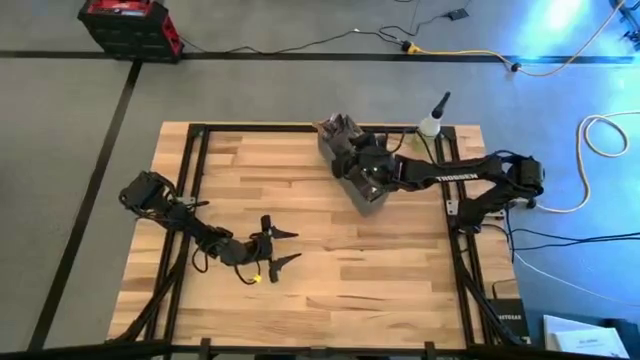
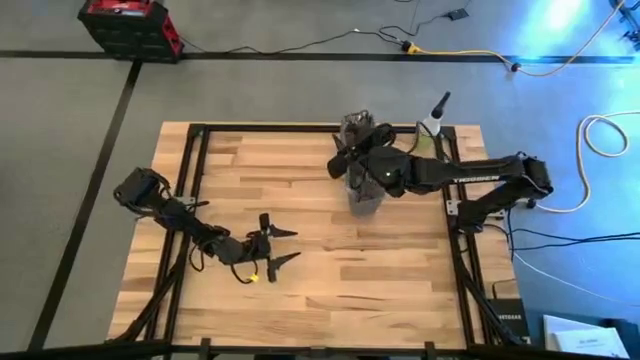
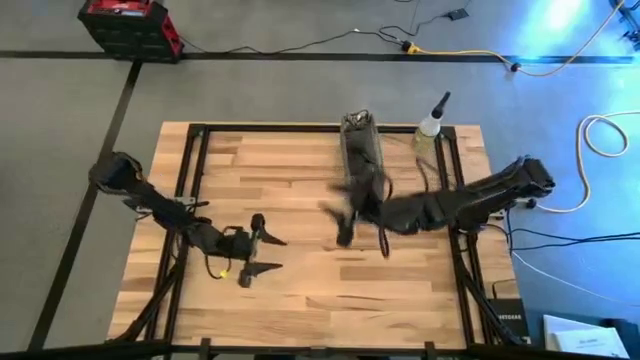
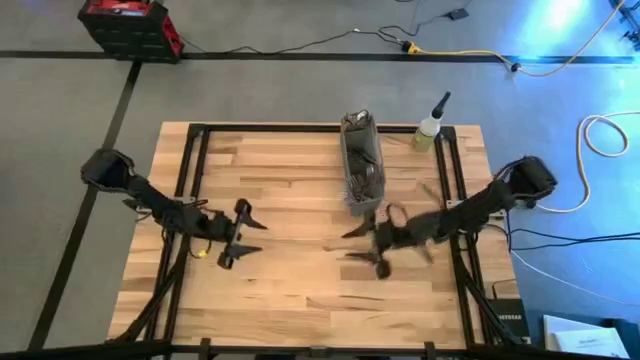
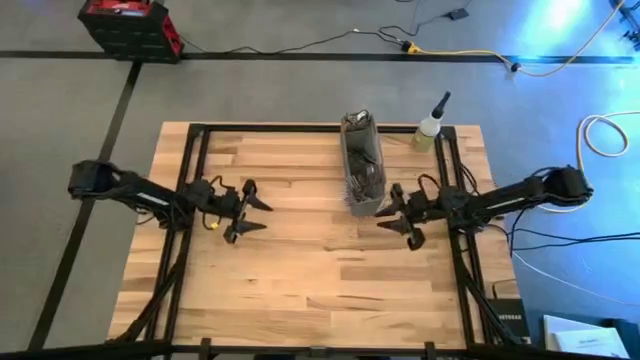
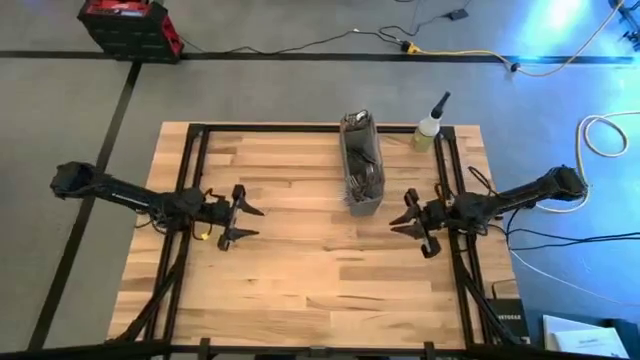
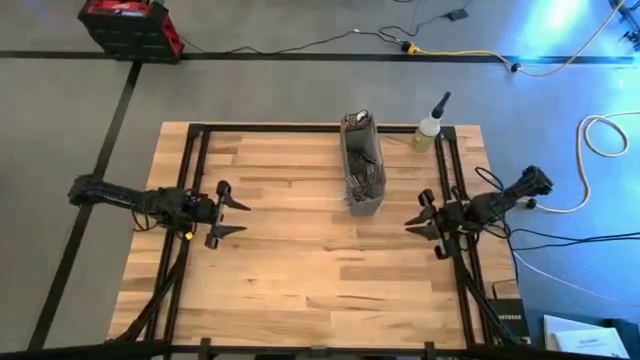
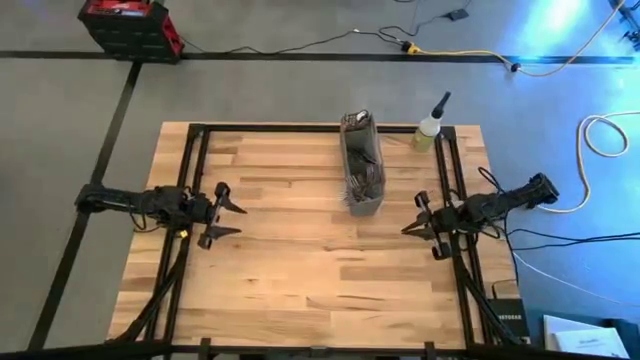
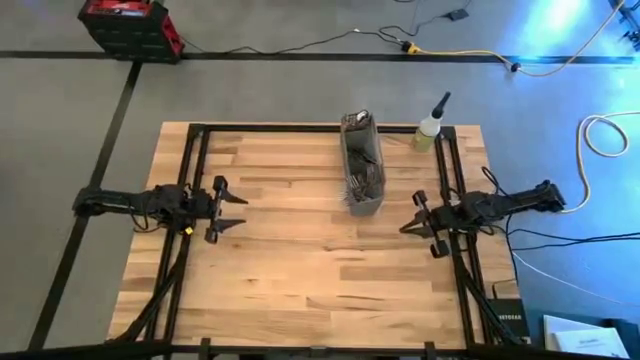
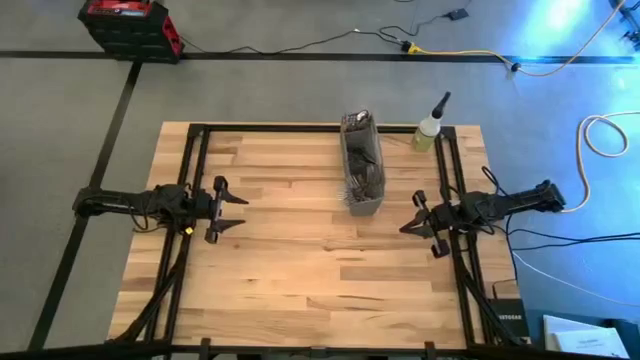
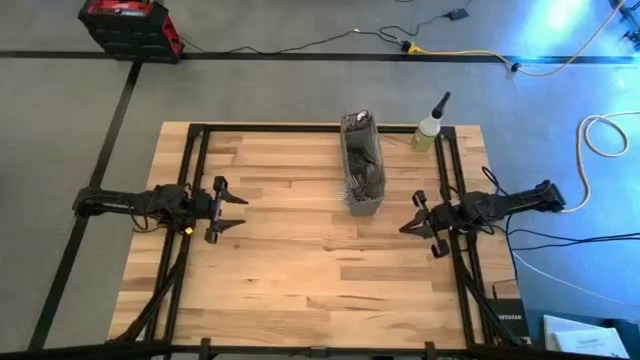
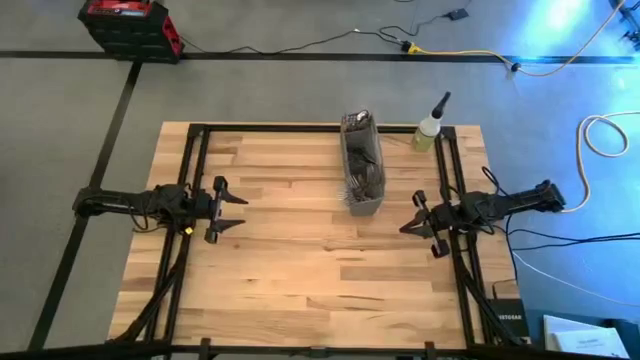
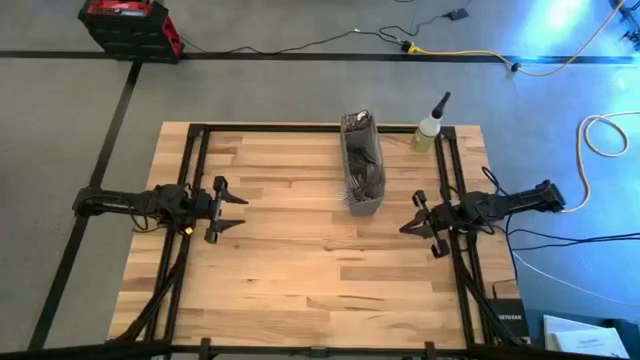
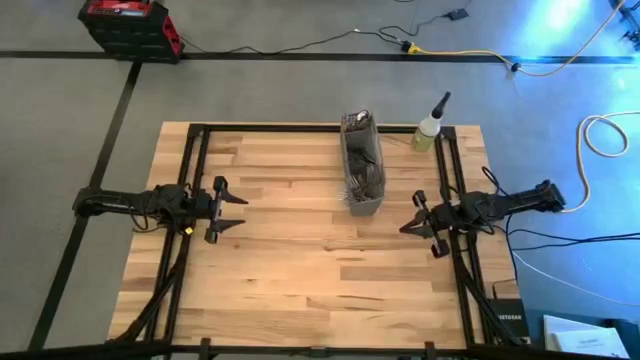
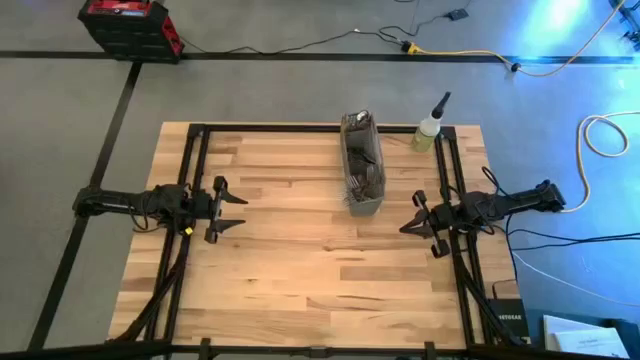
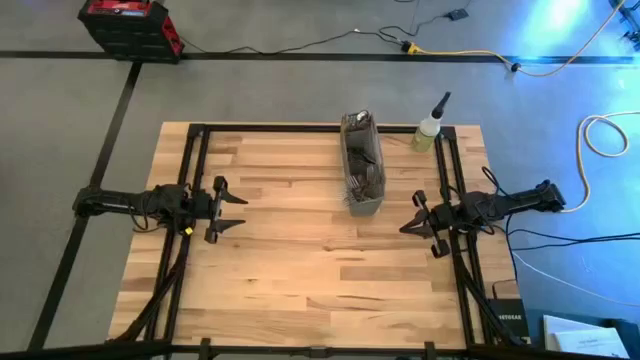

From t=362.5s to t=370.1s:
Task: Sort silverware
Return to Home Position

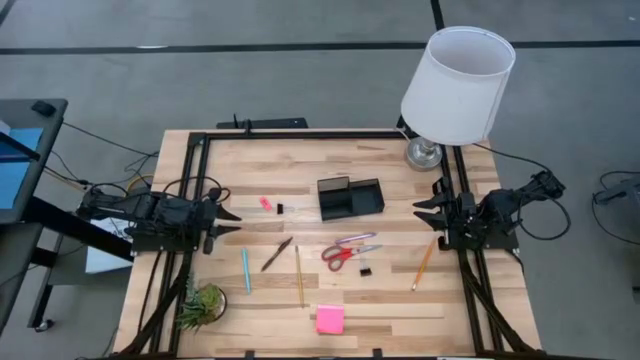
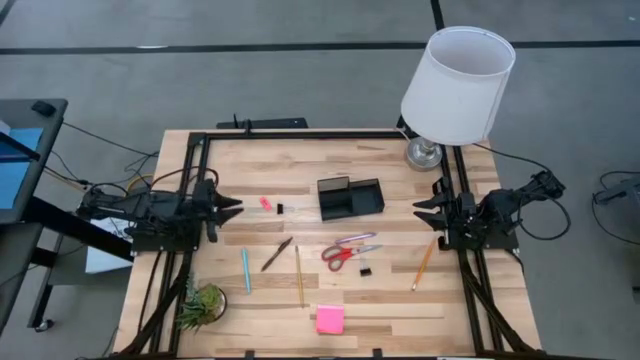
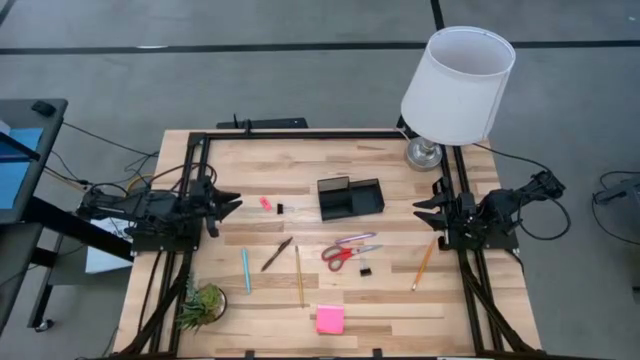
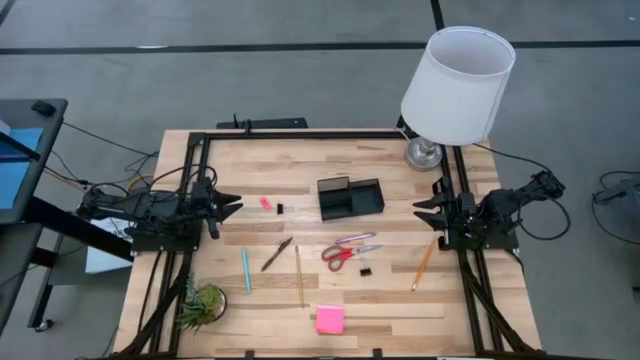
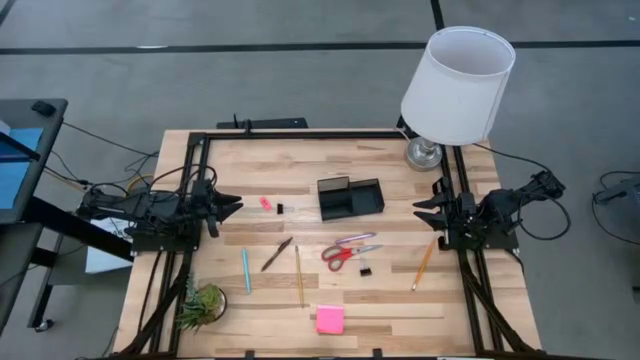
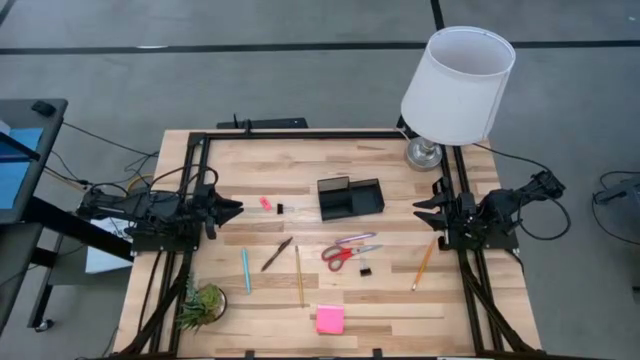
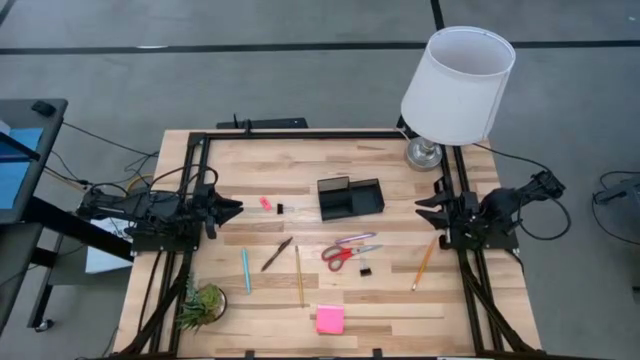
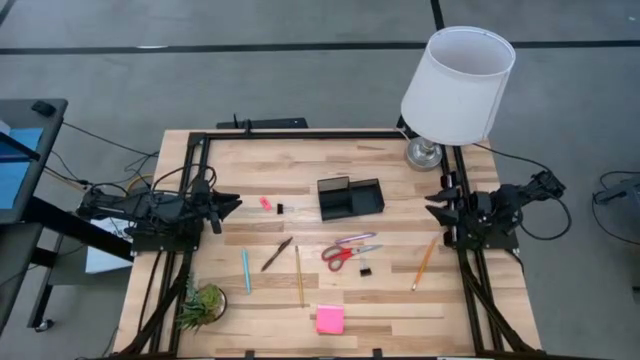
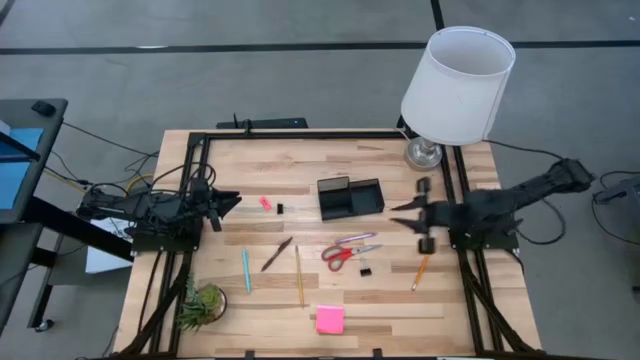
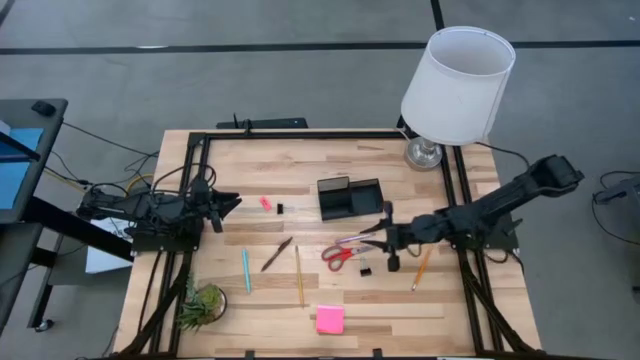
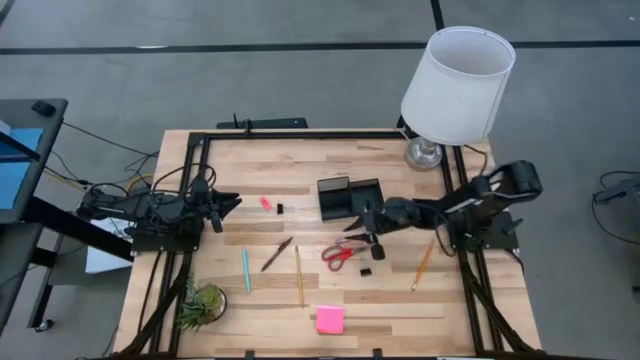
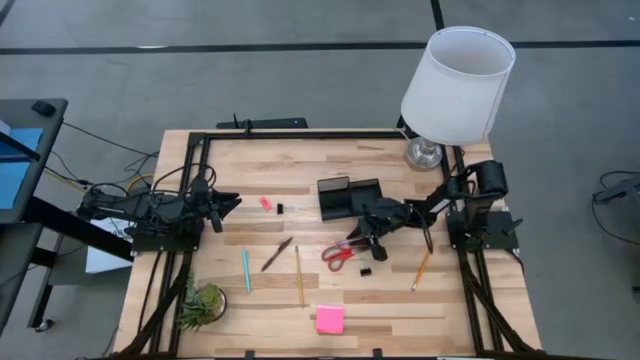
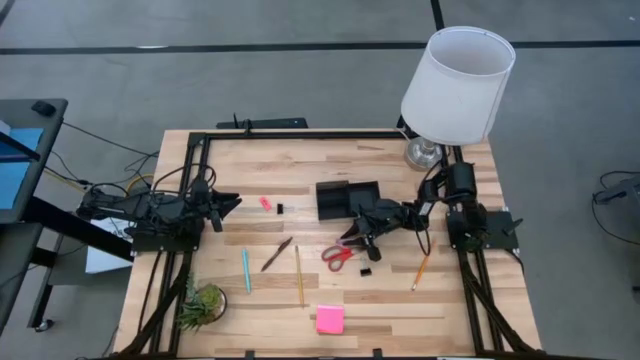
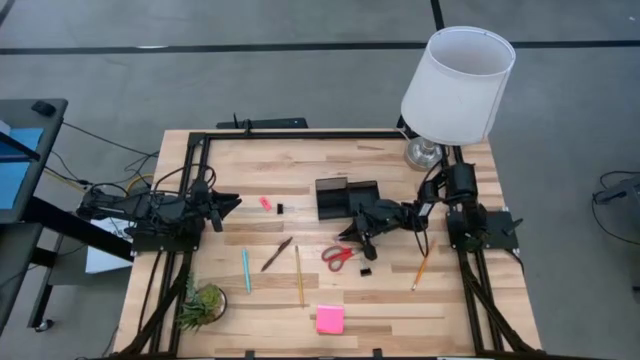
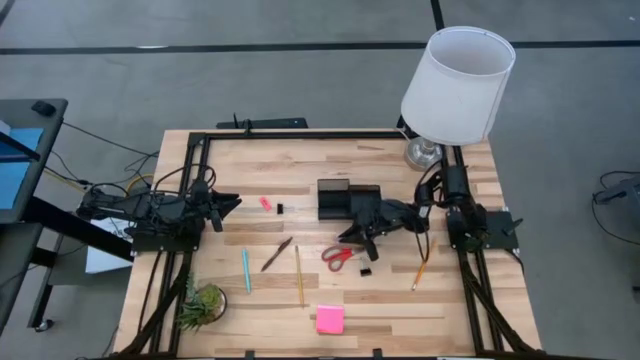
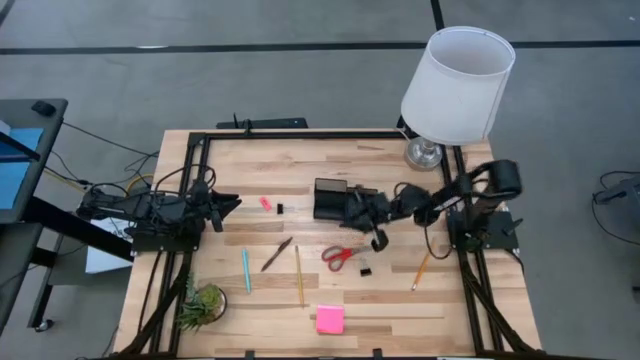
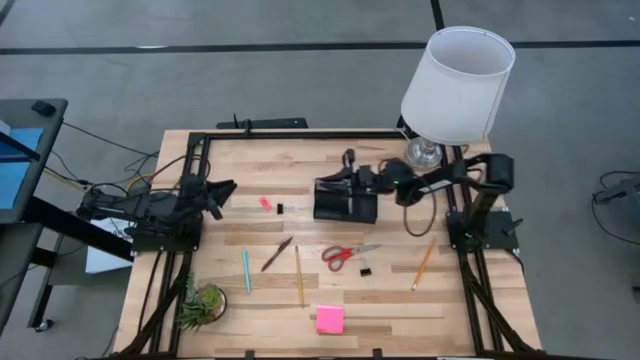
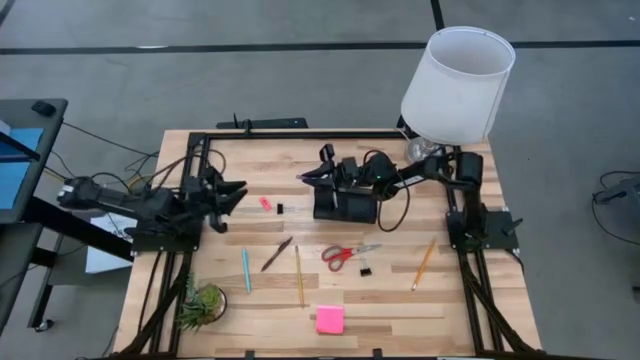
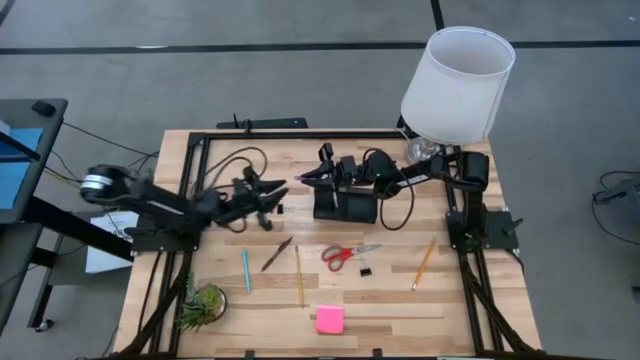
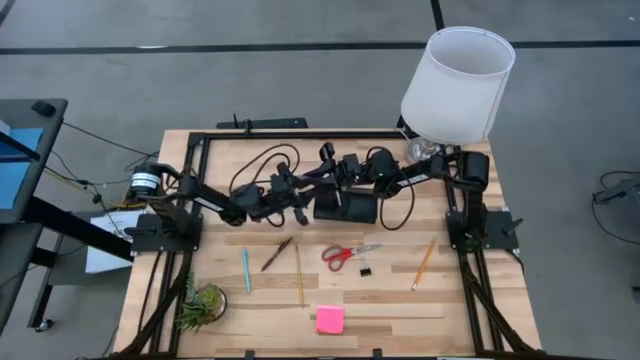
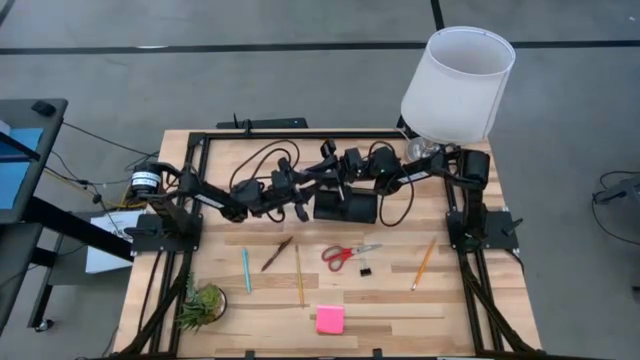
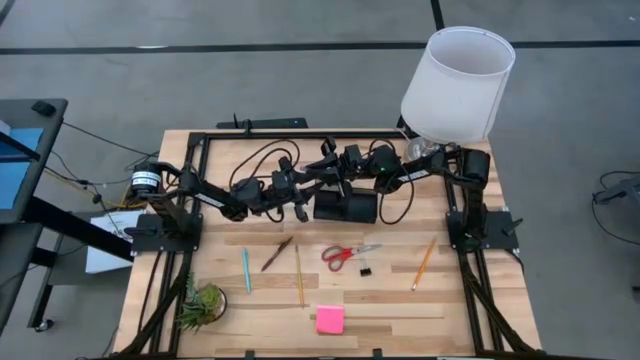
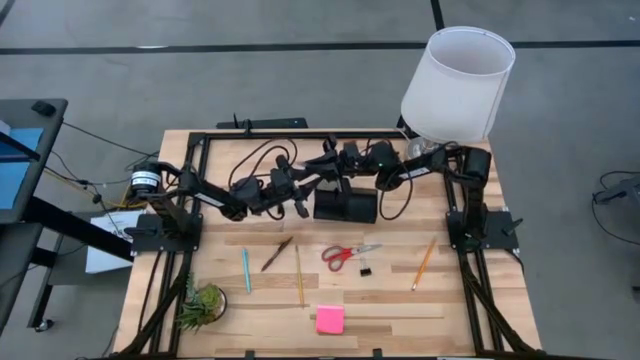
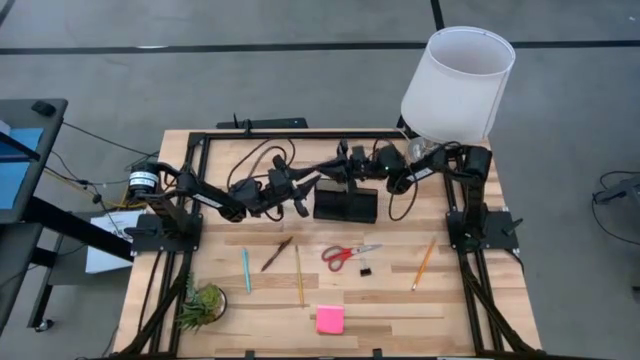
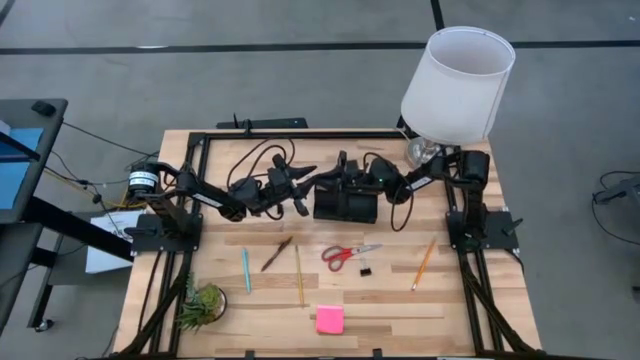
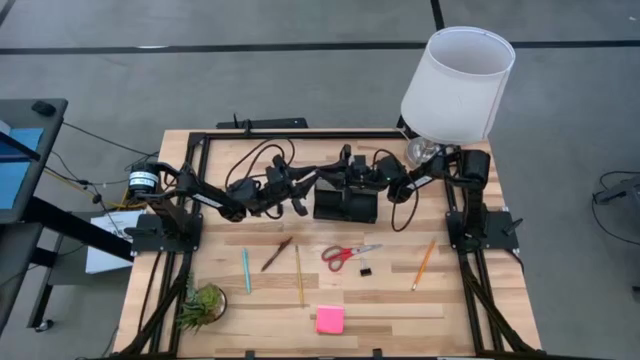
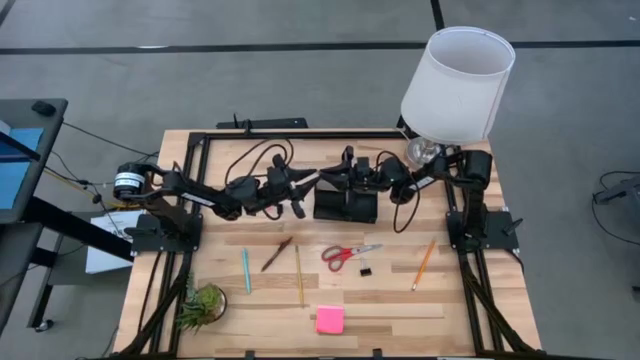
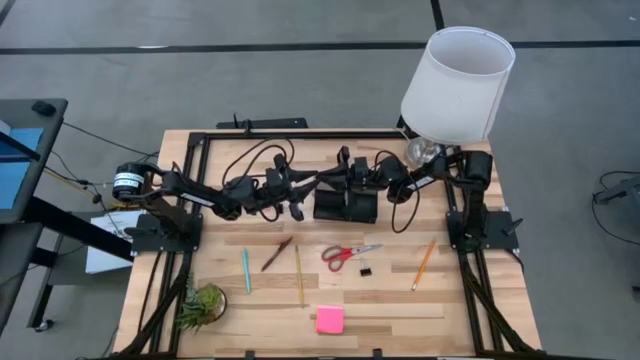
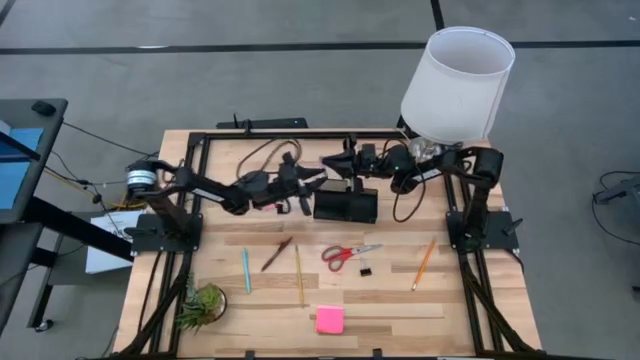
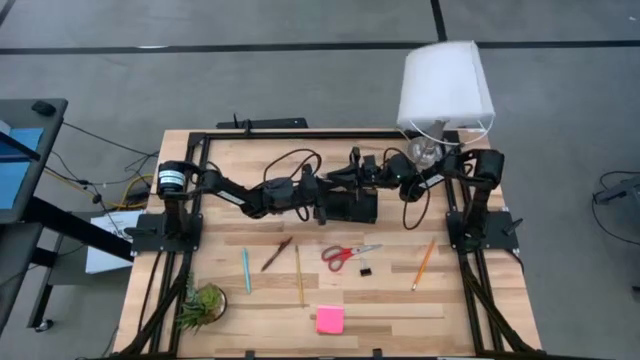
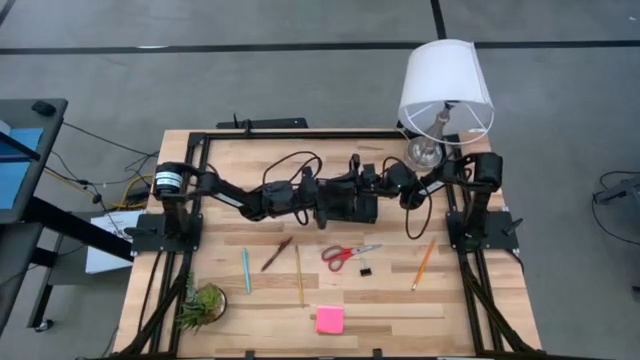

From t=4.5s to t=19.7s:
Task: Pick and place office supplies into organizer
Put the pink pen into the desk organizer
